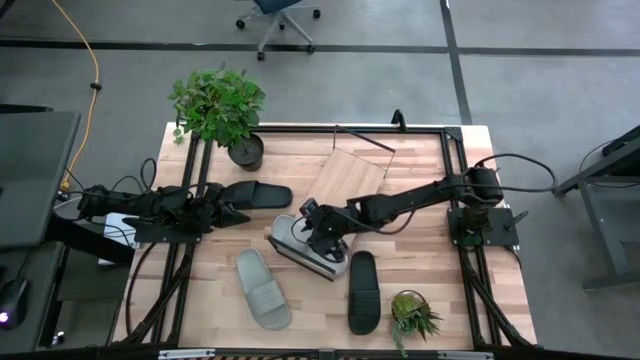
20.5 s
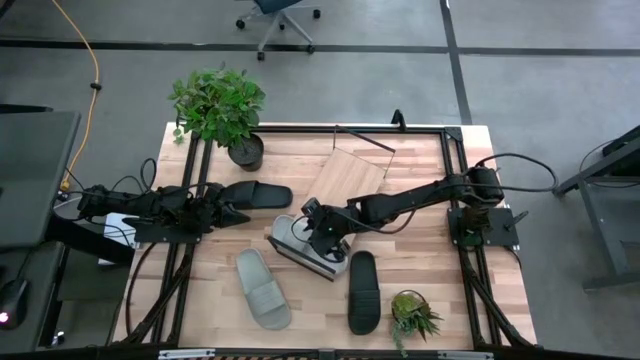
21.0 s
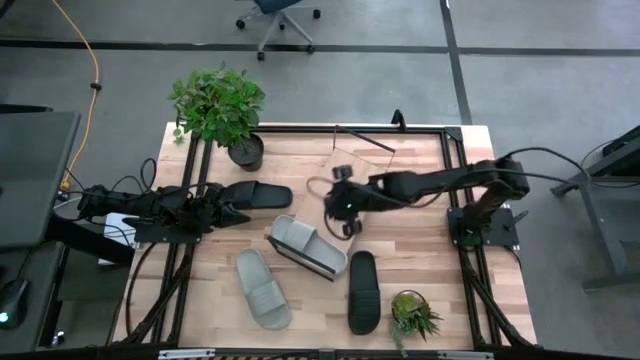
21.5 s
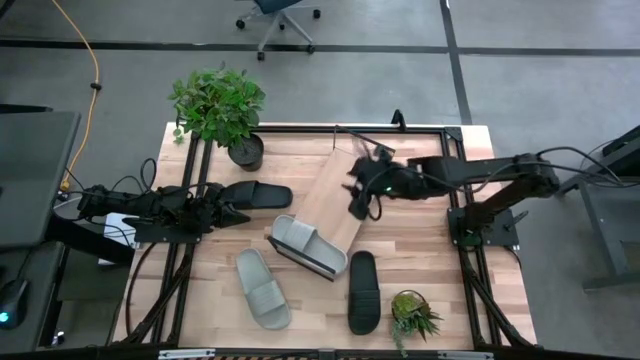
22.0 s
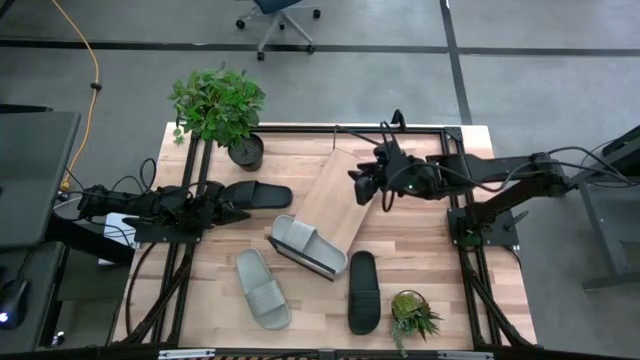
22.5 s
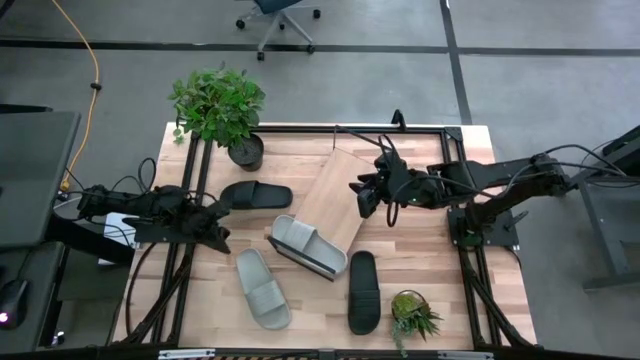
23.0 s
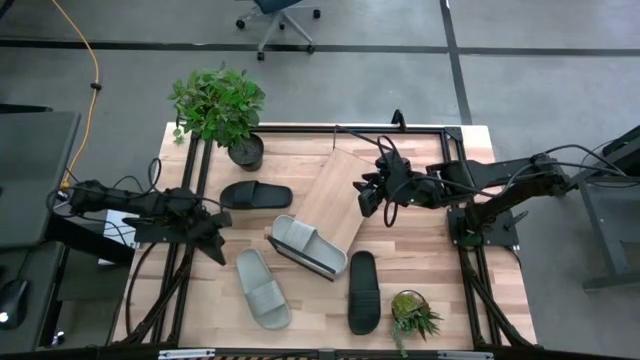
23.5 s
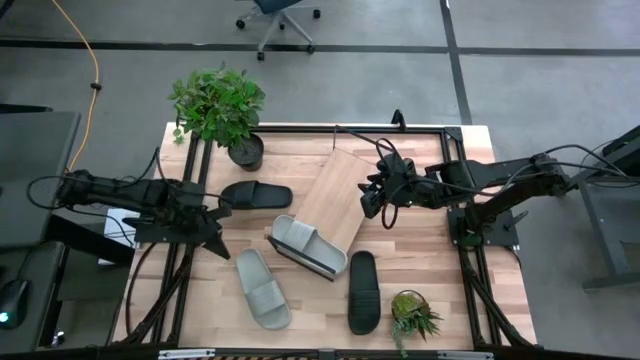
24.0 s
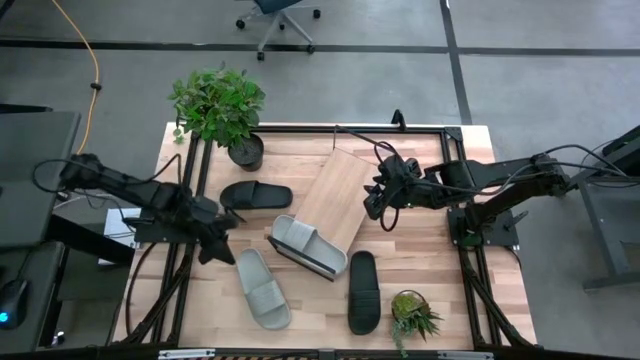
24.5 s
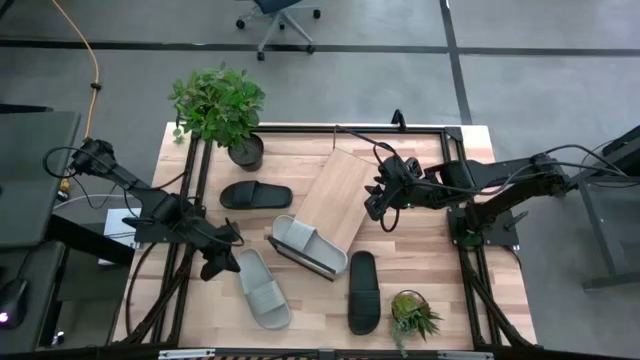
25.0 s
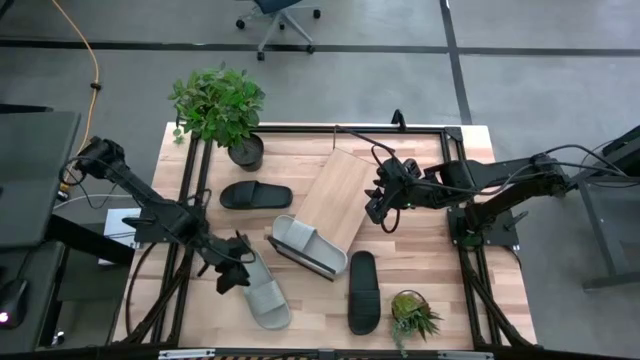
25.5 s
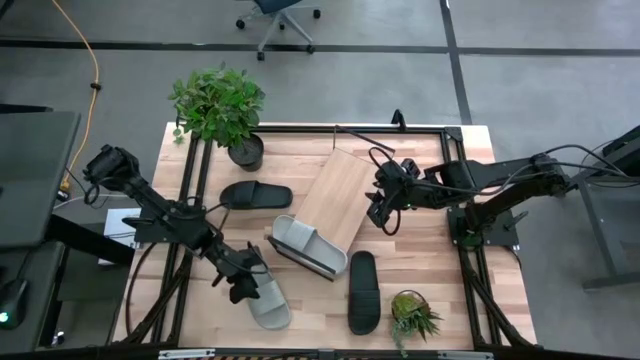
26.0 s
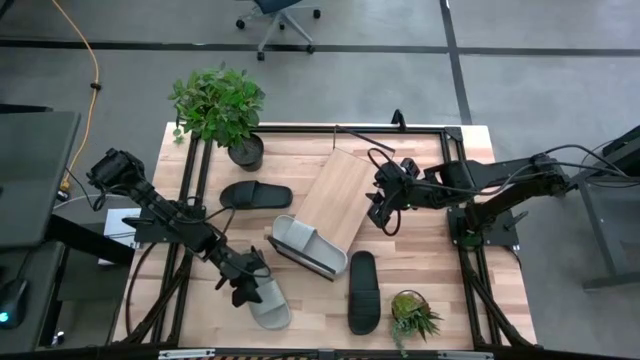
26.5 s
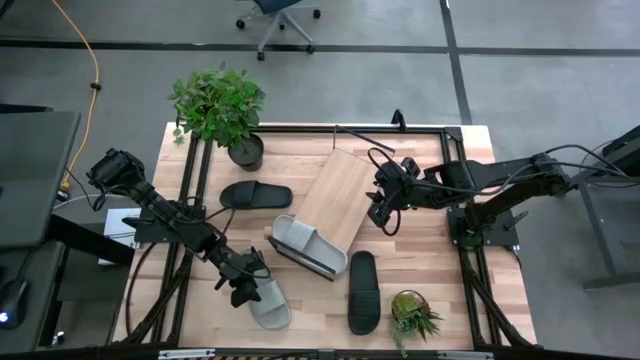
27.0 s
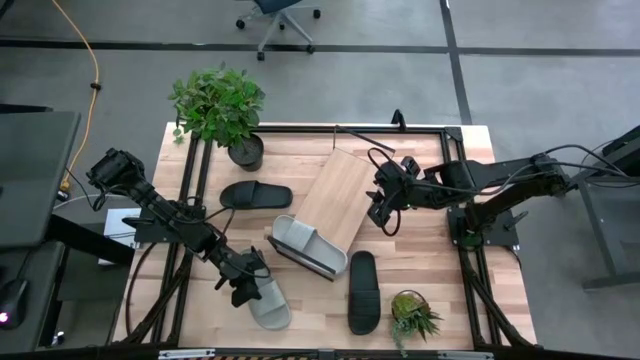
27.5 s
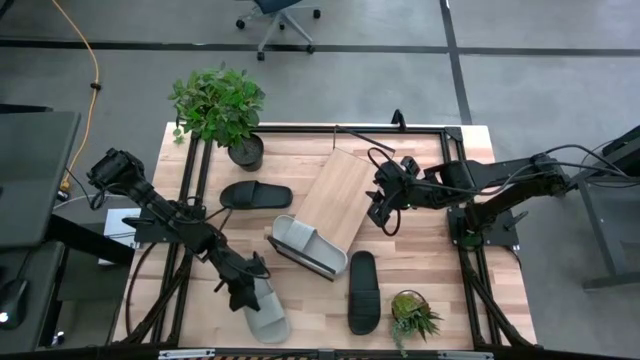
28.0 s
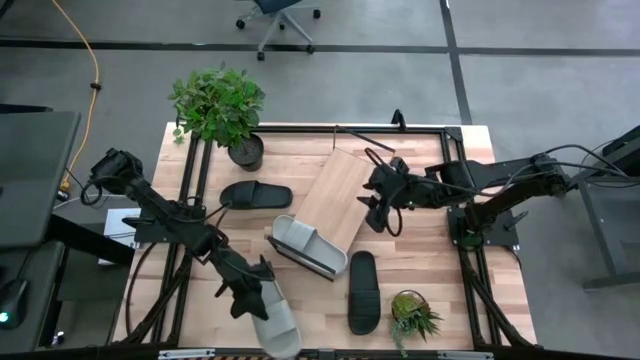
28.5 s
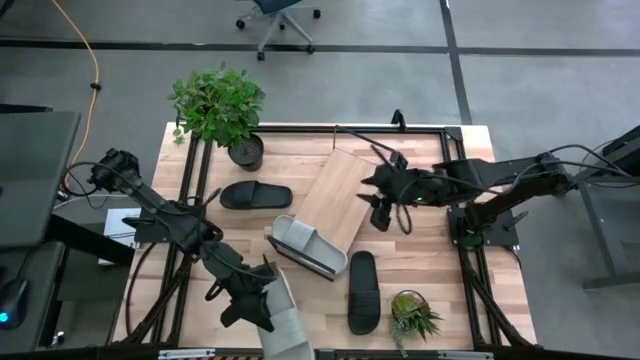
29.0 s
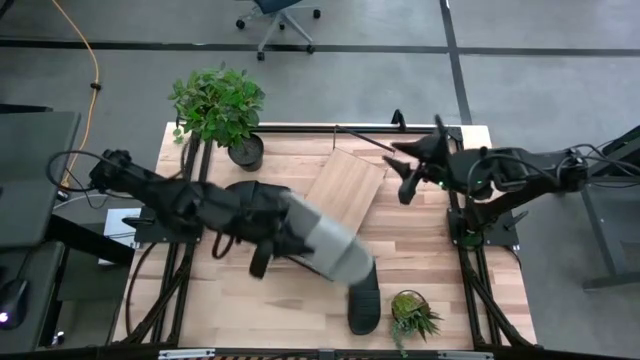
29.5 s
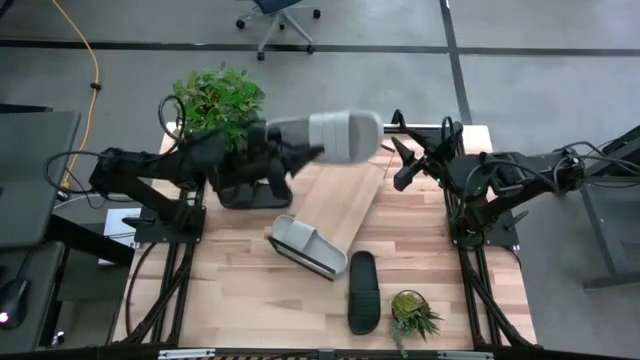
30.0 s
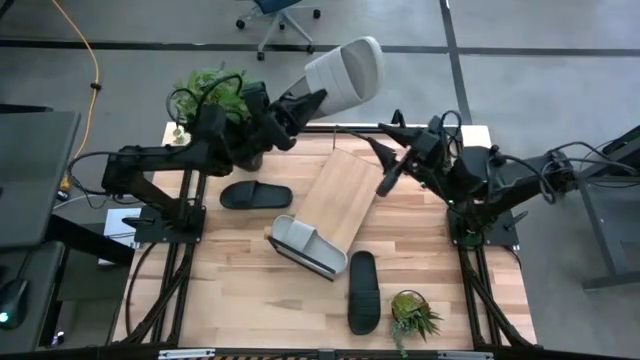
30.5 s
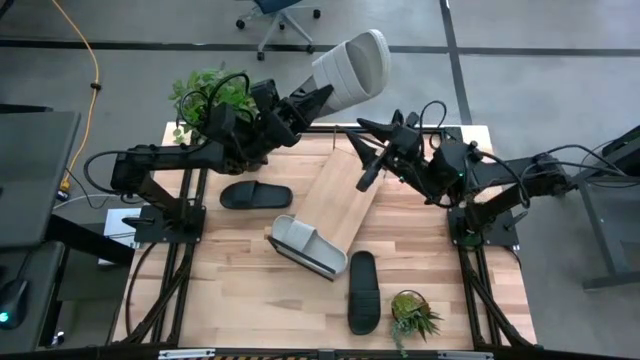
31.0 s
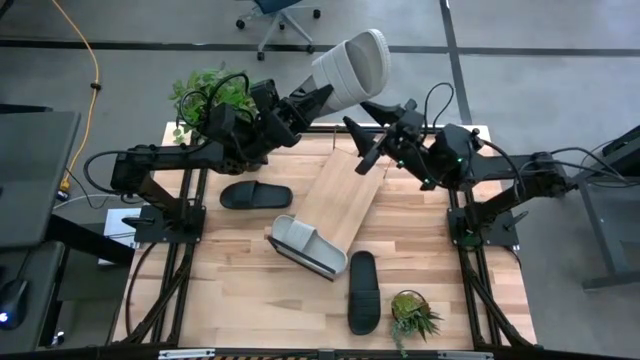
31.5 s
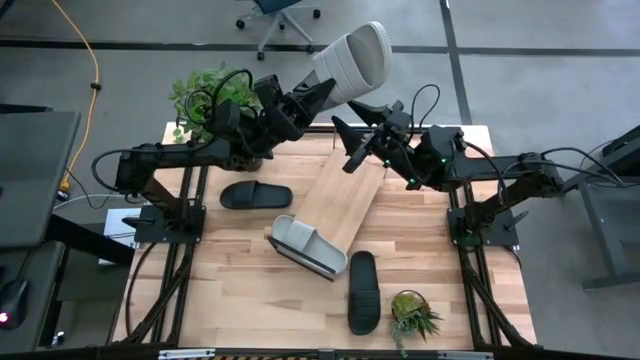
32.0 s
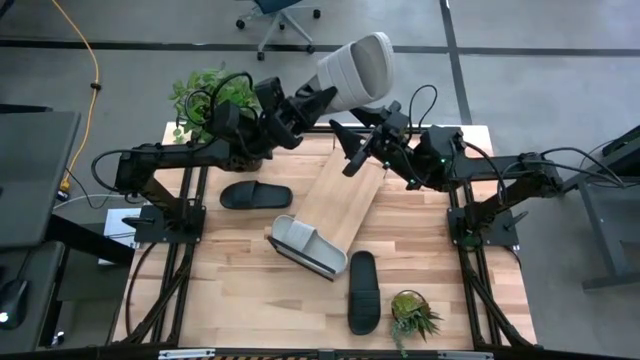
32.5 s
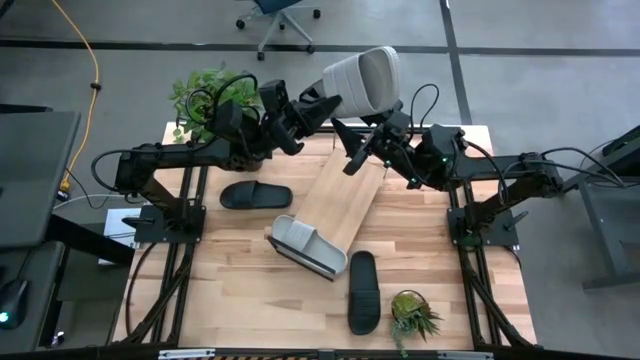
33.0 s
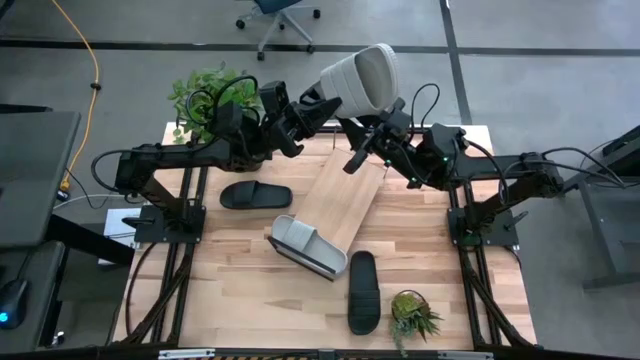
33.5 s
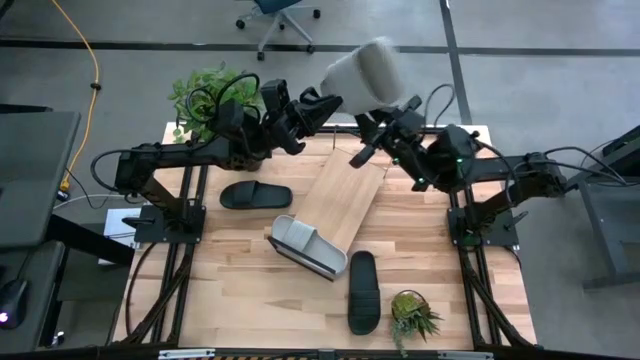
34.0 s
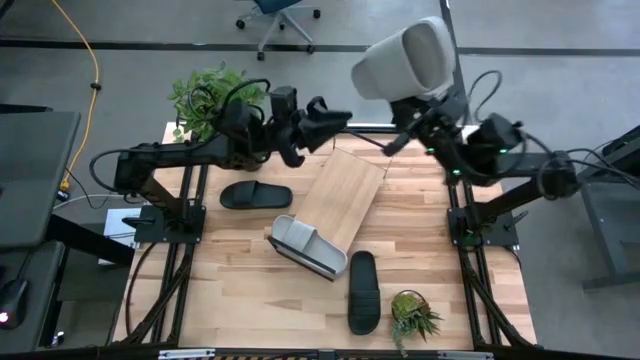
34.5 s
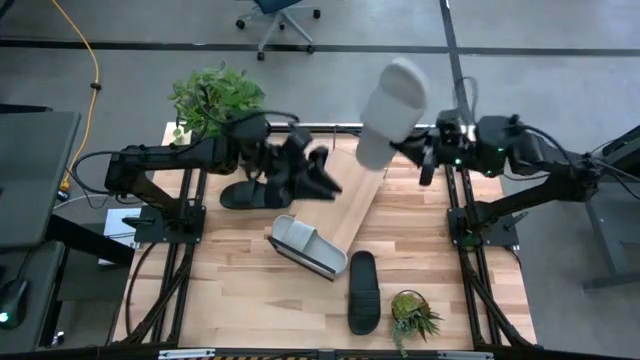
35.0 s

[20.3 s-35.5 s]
Task: Pick and place slides into the shelf
Put the gray slide on the shelf

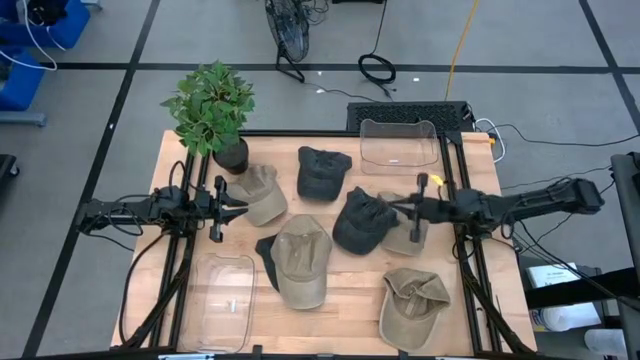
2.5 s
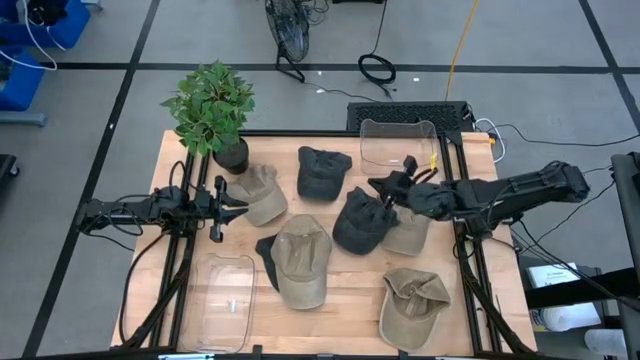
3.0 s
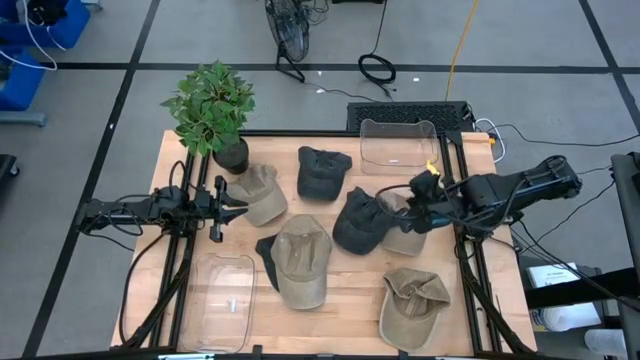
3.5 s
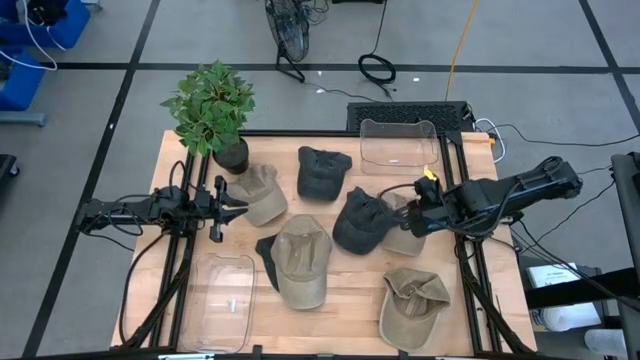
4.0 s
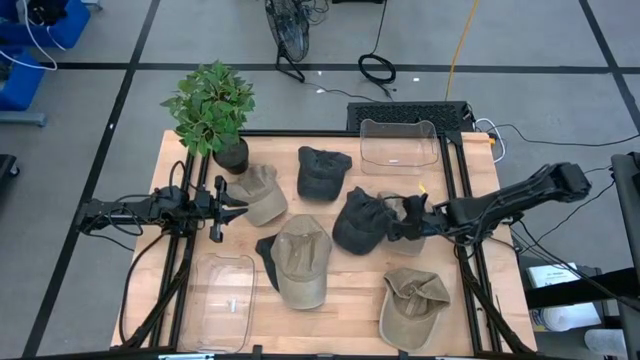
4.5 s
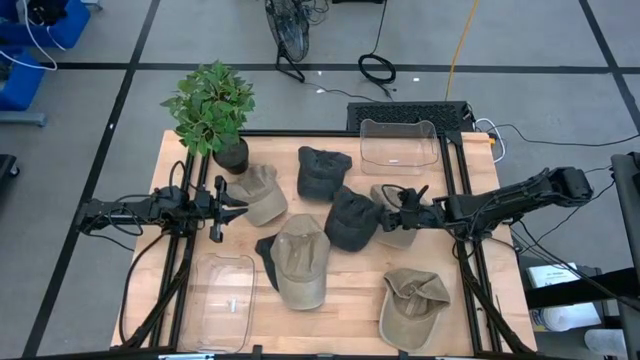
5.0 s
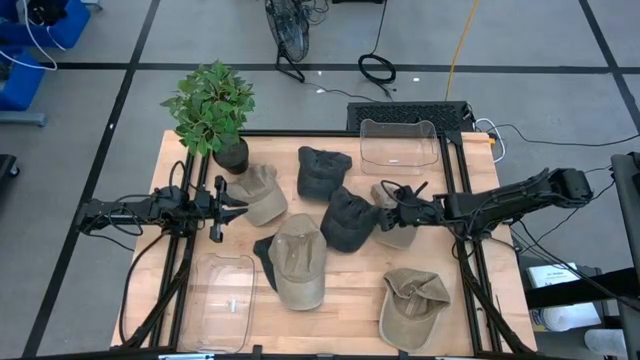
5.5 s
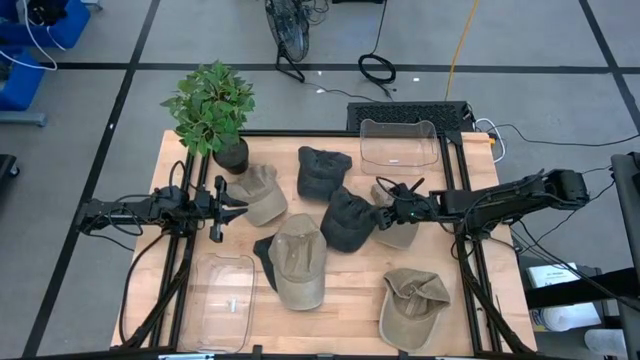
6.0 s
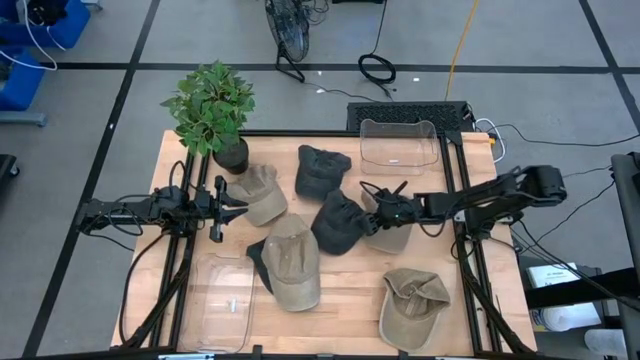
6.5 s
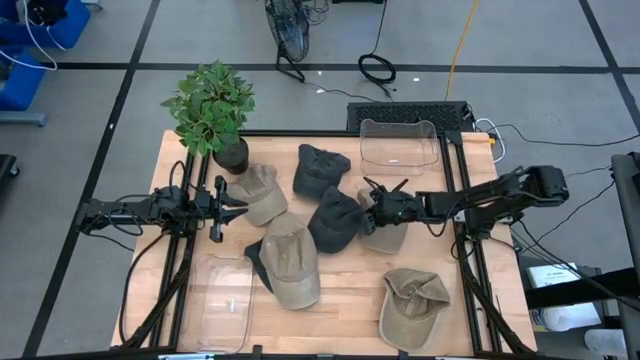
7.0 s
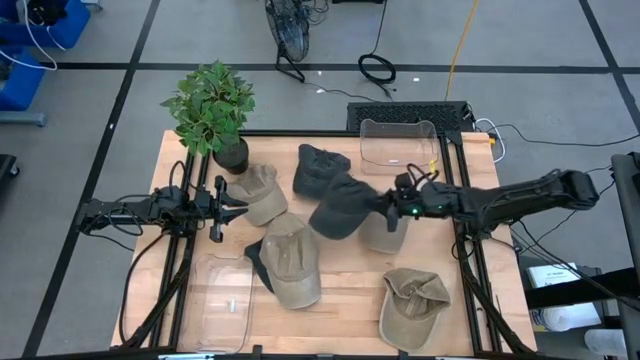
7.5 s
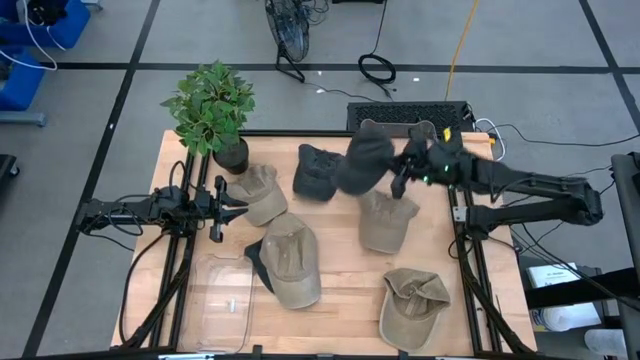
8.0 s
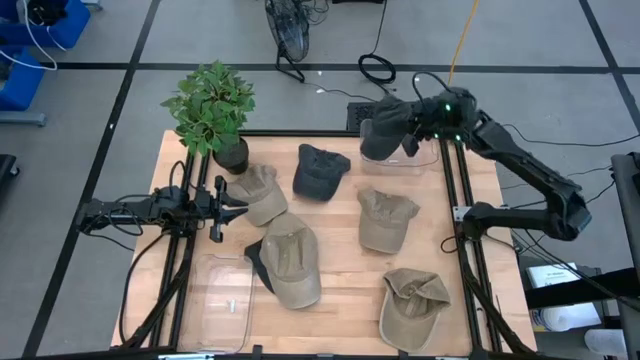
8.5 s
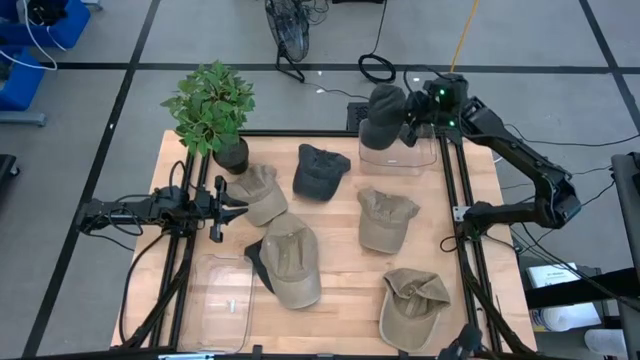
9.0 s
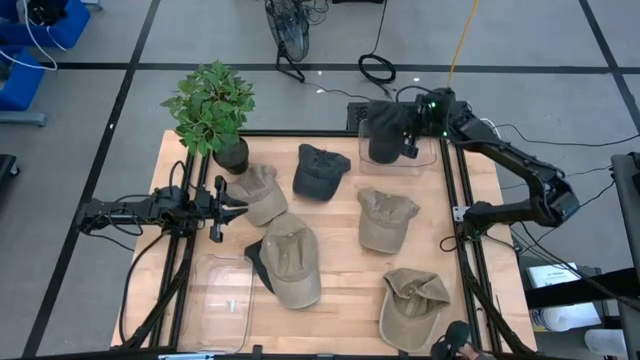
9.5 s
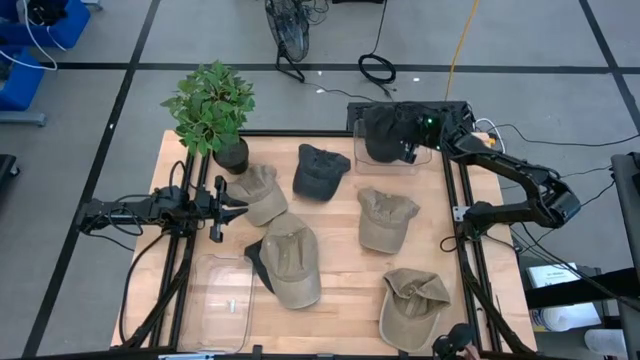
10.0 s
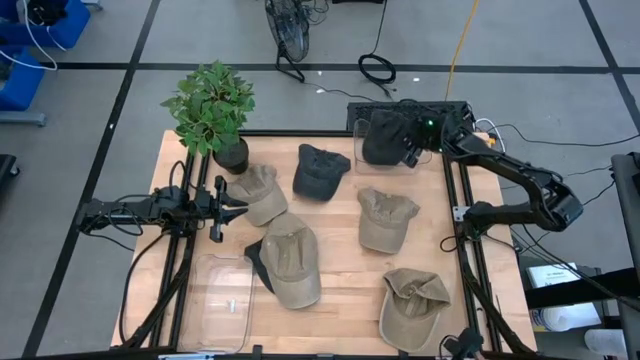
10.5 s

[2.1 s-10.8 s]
Task: Pick & Place hat
Put the black cap into the top transparent bin
